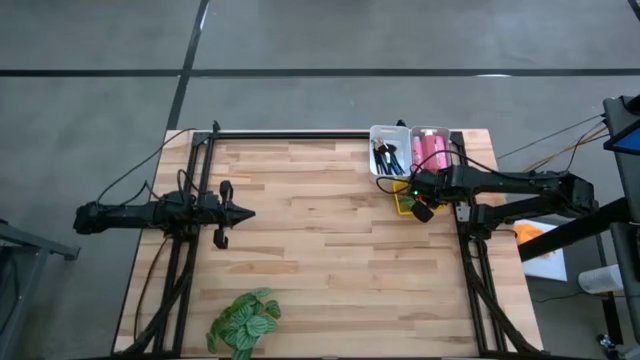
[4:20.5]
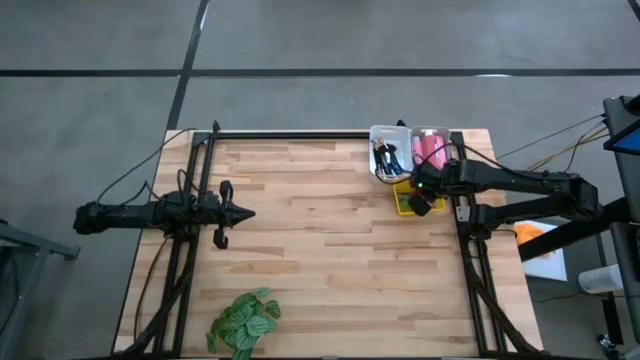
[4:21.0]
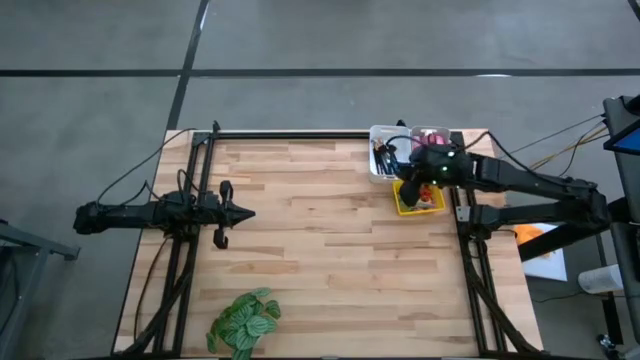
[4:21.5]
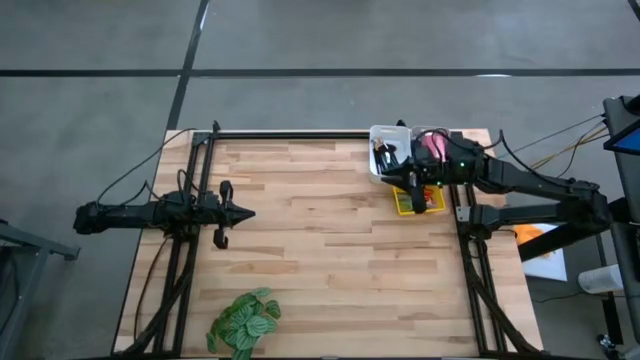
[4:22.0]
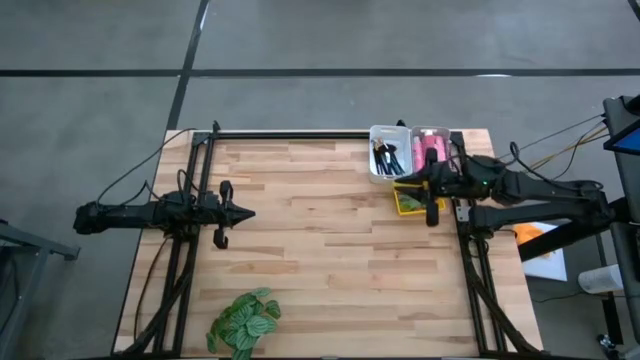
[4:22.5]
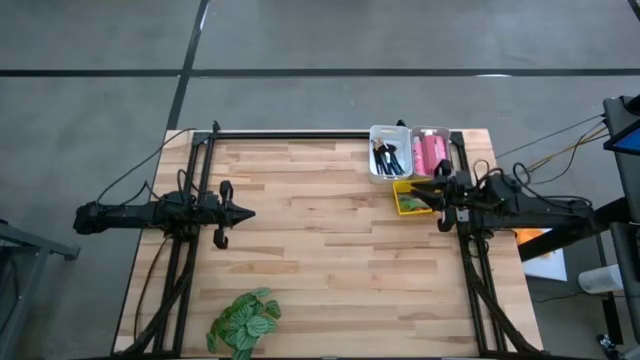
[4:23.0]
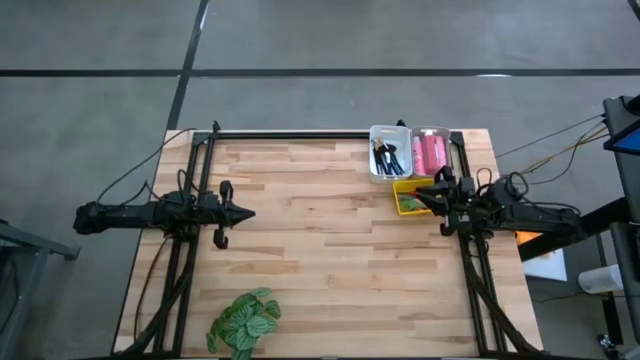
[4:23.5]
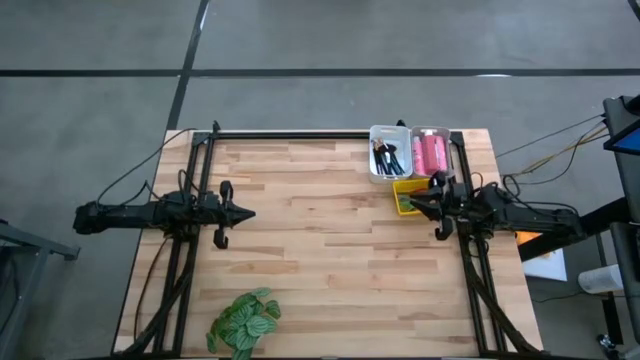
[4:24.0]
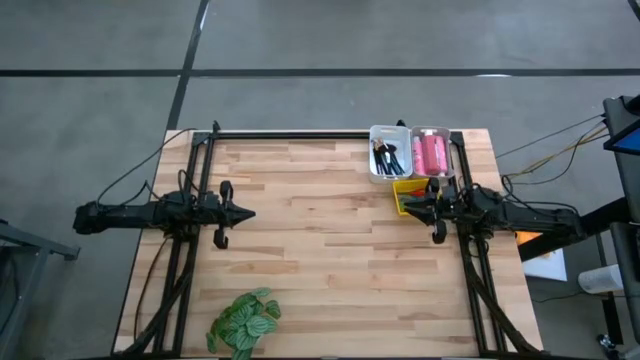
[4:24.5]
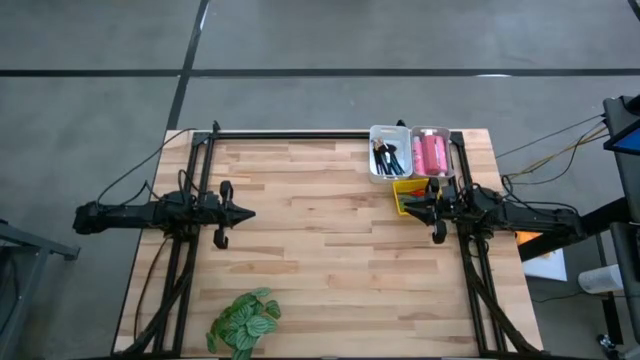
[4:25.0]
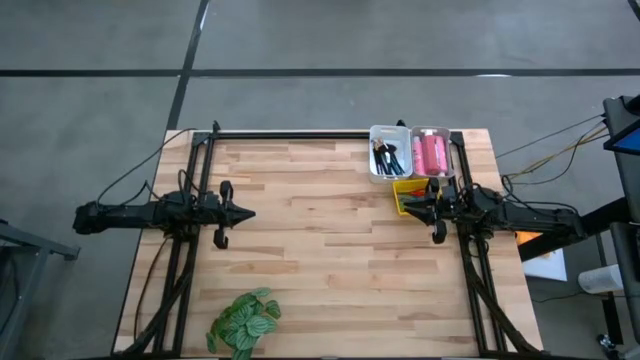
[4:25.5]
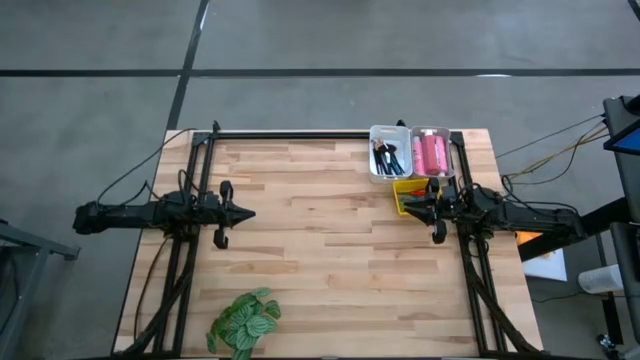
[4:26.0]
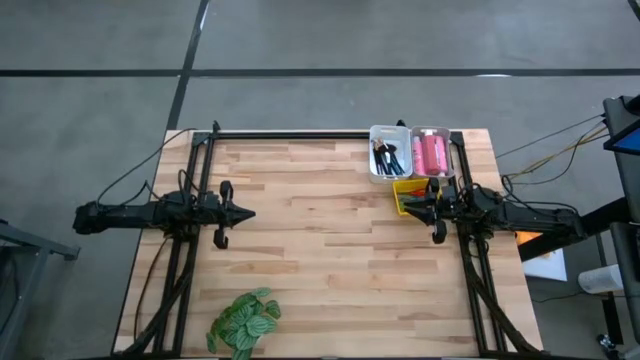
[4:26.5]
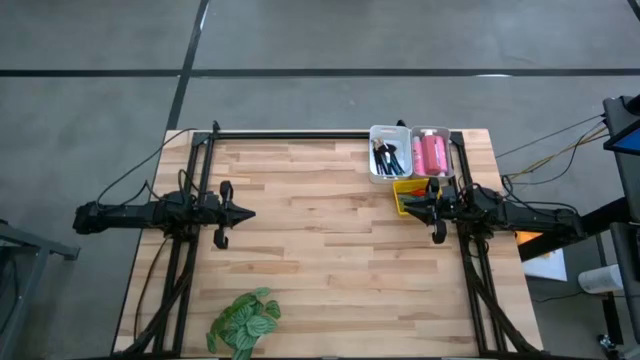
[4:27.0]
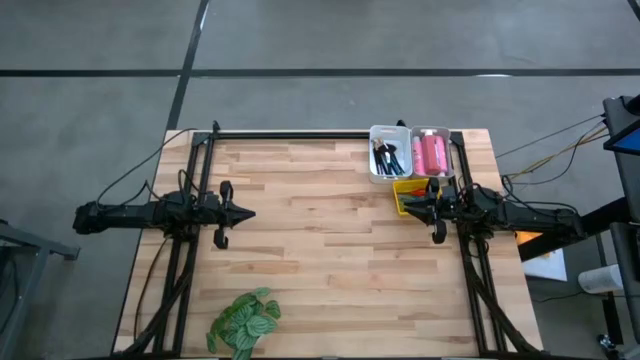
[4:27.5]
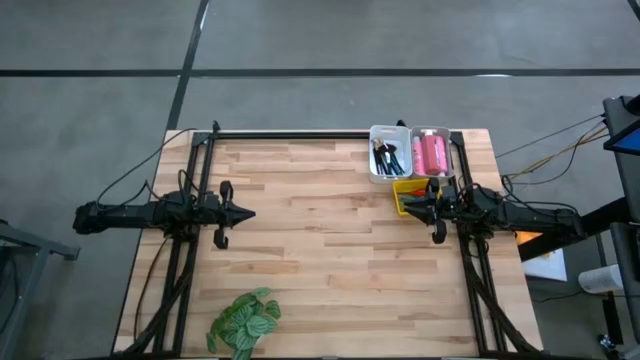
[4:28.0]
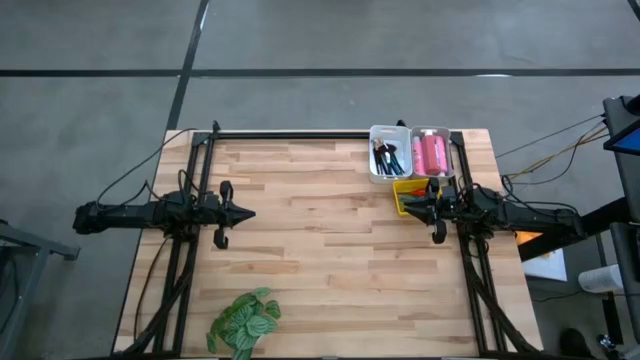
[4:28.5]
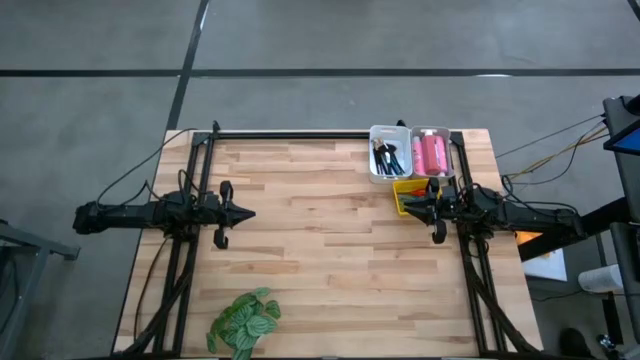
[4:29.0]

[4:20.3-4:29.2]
Task: Pick & Place Paint Supplies
Return to Home Position

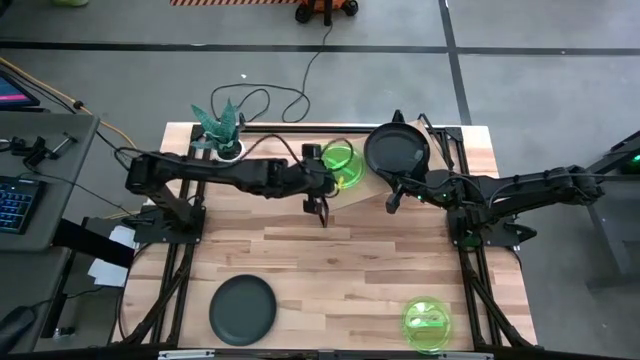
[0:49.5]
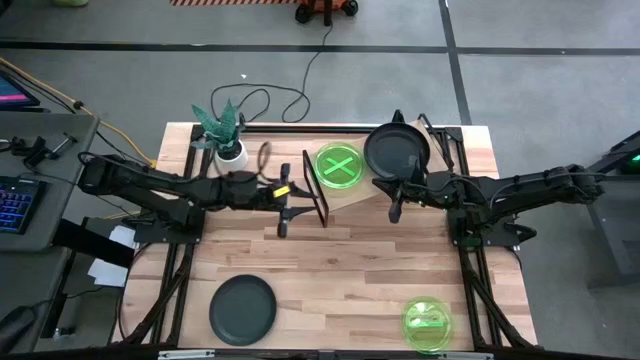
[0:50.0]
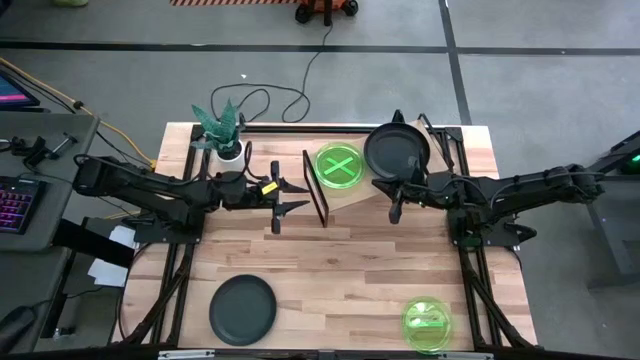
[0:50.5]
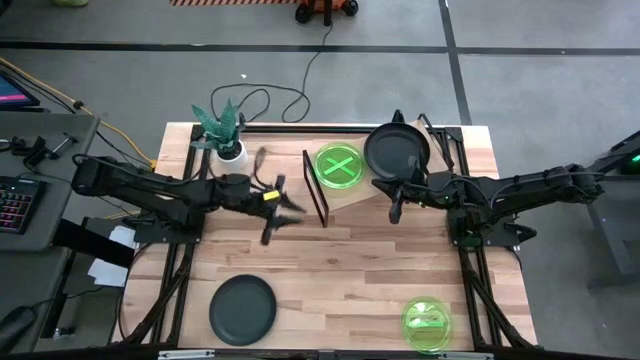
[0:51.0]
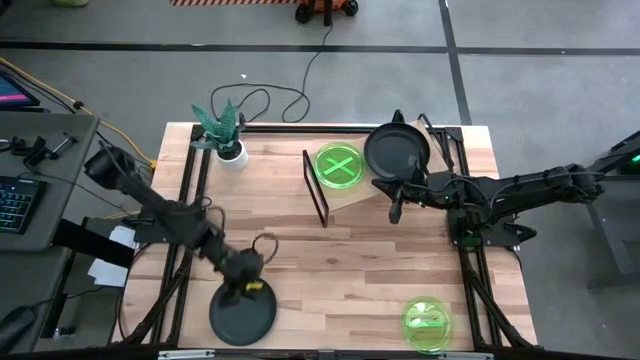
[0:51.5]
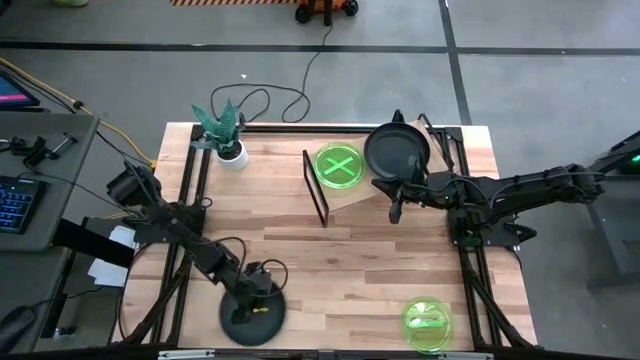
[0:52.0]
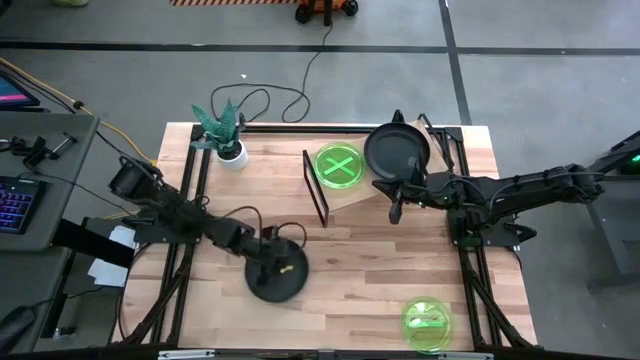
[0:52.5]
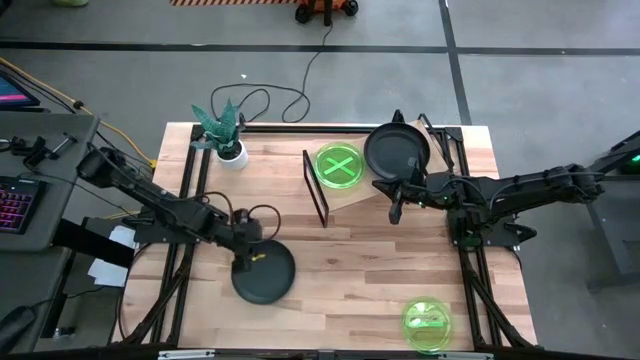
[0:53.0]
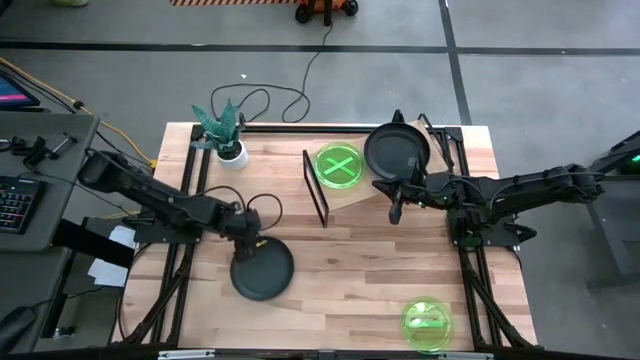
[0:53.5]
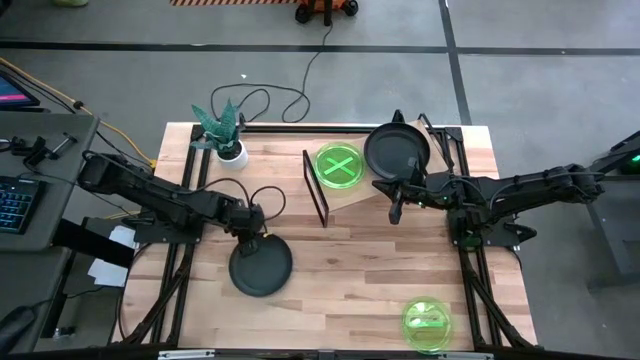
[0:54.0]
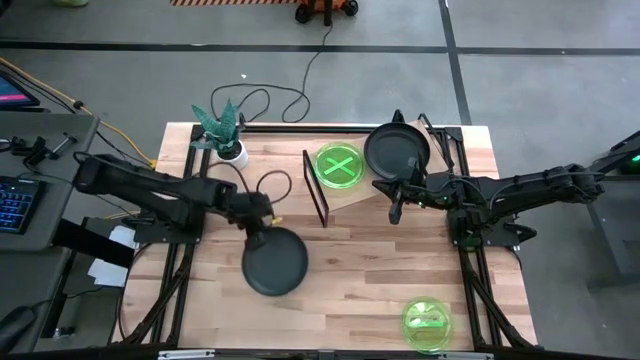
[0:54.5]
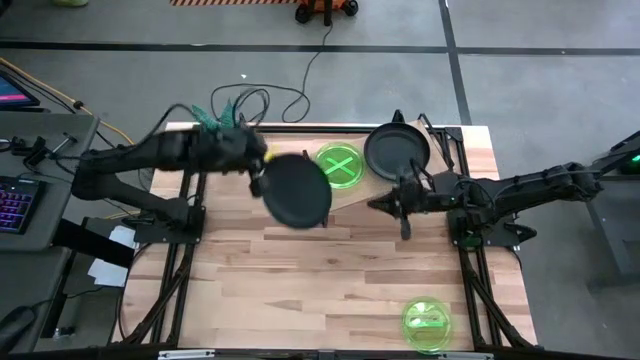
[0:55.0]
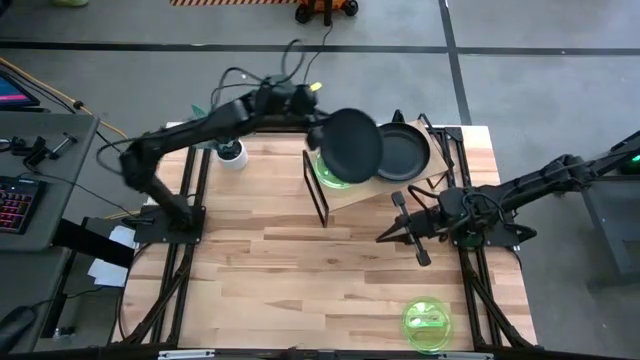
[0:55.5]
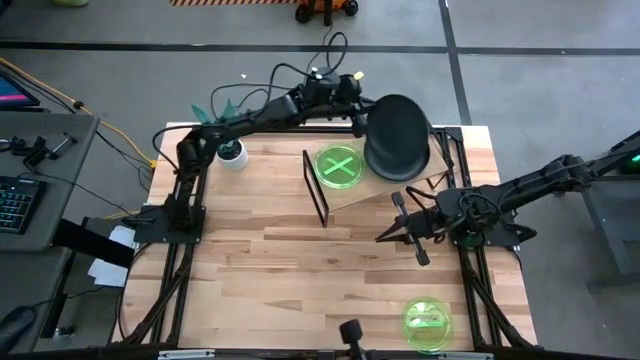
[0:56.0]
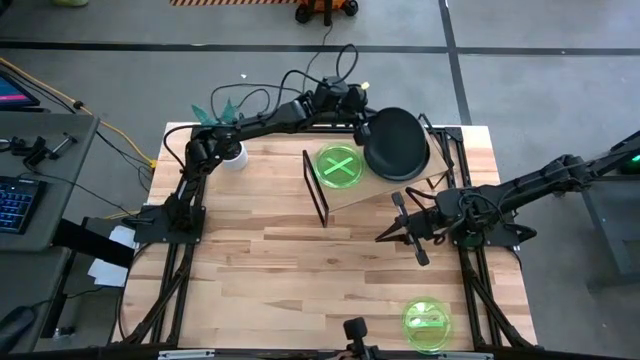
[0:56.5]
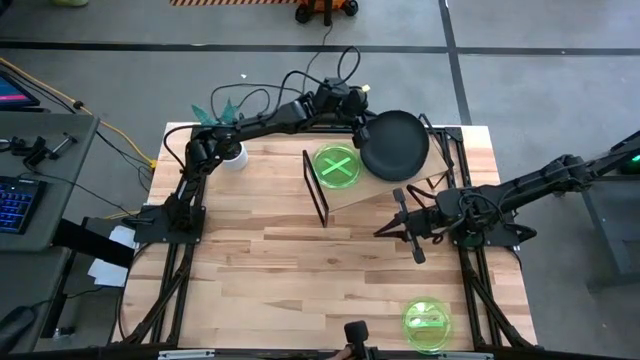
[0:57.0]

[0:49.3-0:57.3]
Task: Place and stack plates onto a shelf
Stack the black plate on the black plates on the shelf

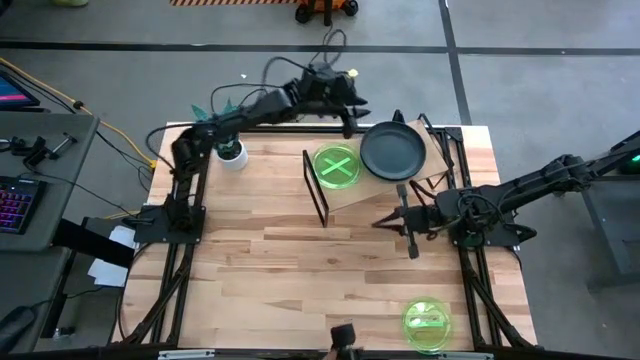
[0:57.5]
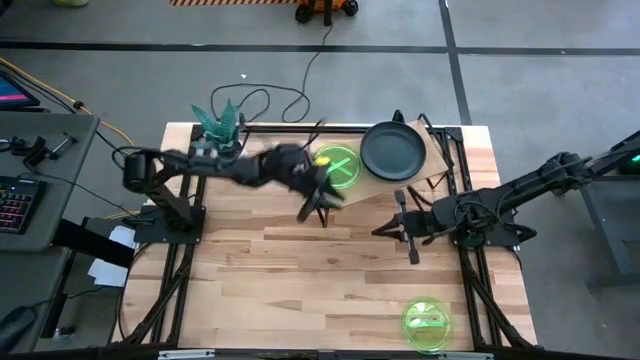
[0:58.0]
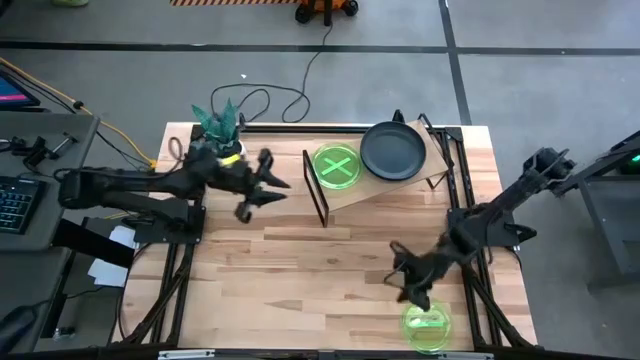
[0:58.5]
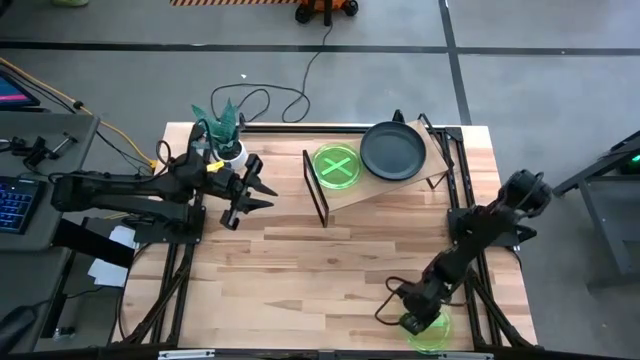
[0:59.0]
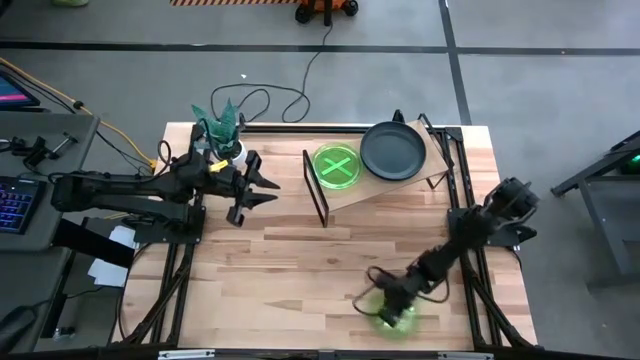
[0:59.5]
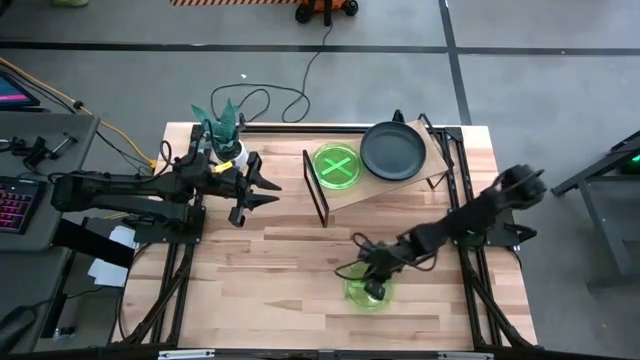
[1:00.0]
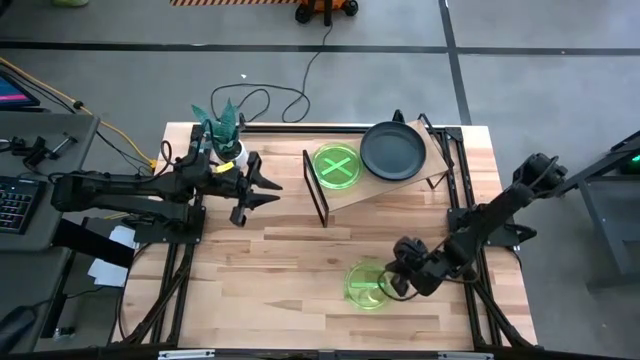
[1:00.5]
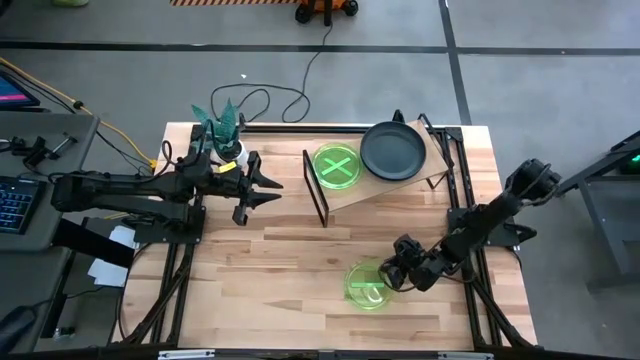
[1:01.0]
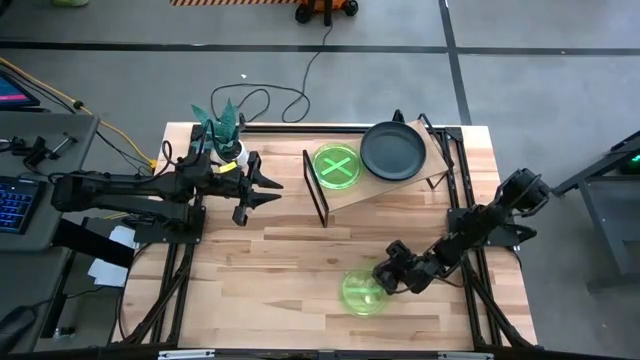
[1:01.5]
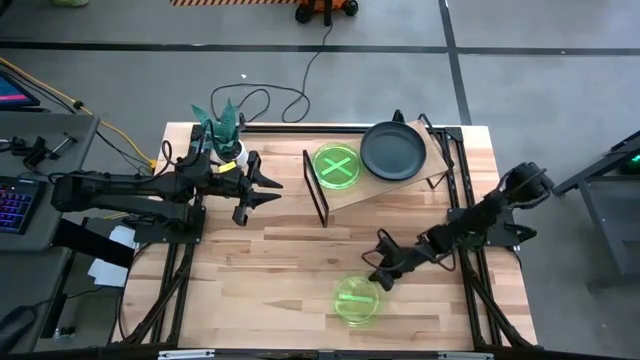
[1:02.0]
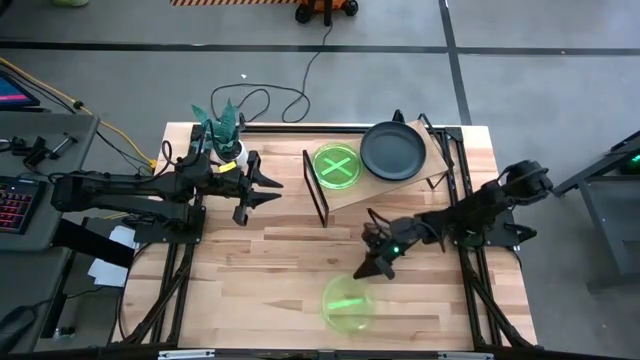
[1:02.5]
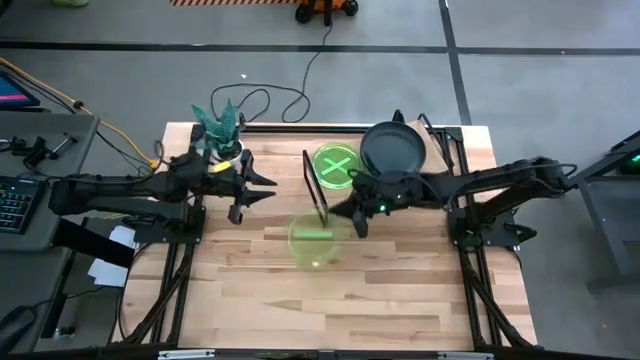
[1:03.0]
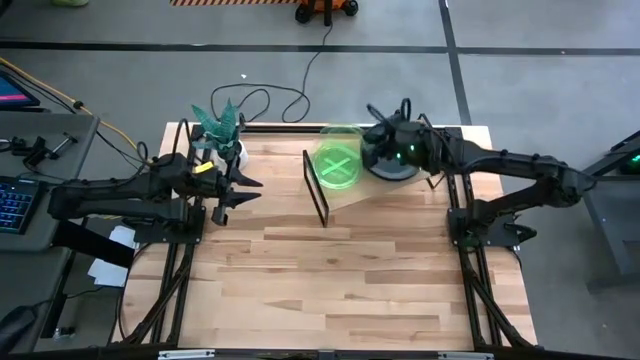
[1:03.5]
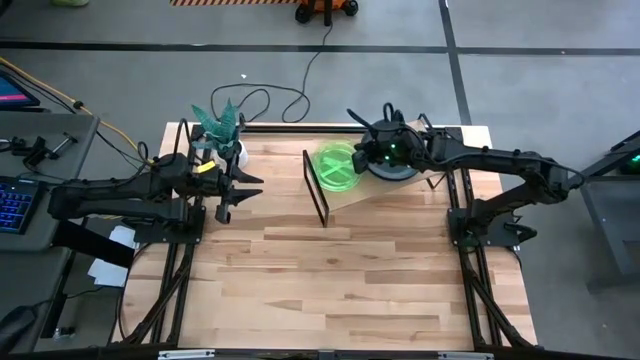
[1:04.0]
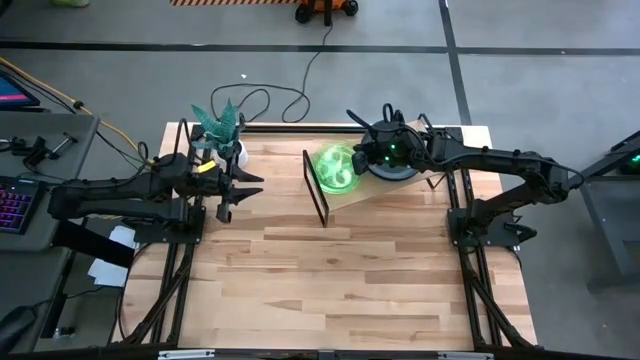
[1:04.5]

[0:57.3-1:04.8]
Stack the green plate on the green plates on the shelf
